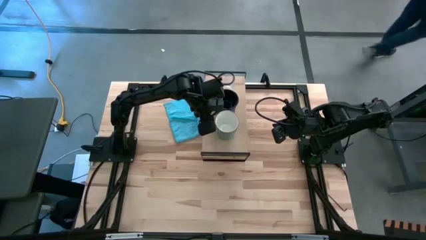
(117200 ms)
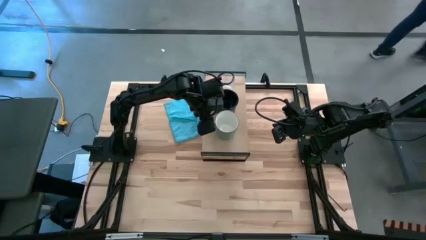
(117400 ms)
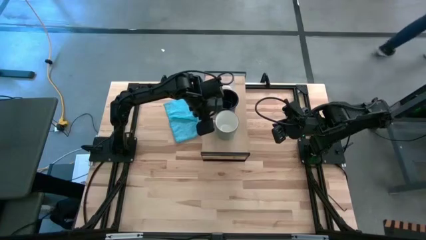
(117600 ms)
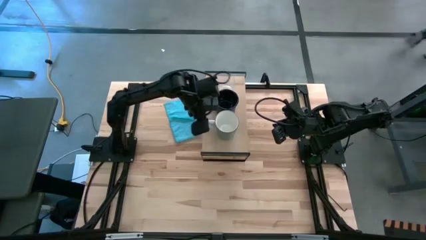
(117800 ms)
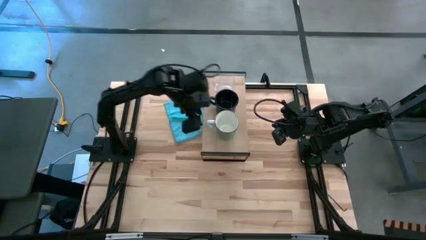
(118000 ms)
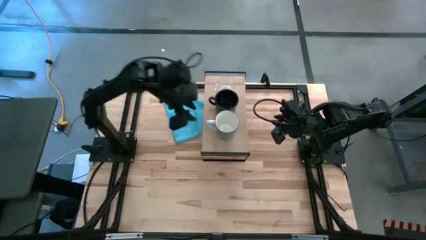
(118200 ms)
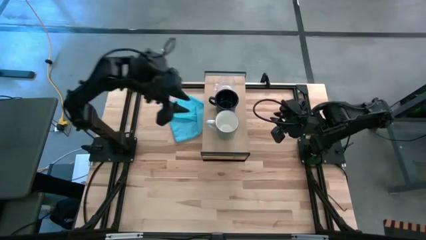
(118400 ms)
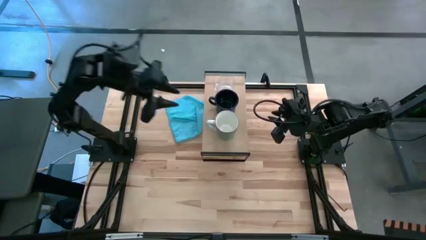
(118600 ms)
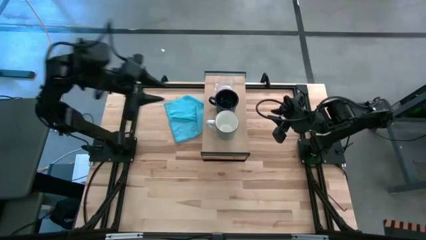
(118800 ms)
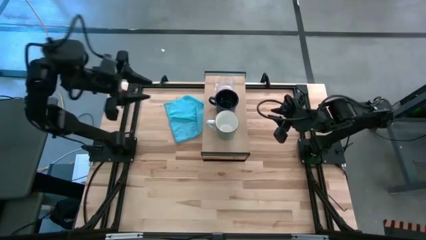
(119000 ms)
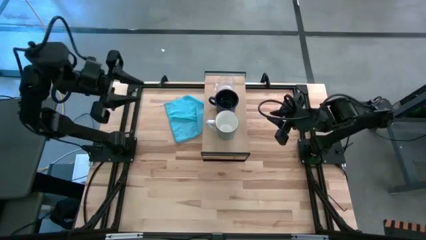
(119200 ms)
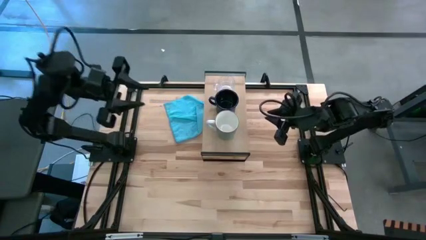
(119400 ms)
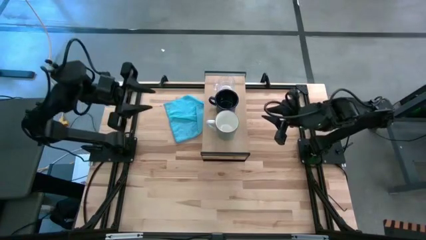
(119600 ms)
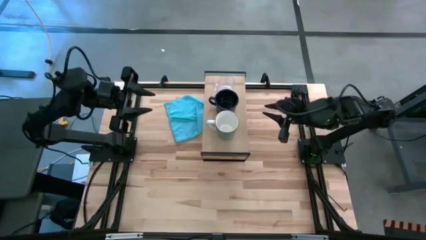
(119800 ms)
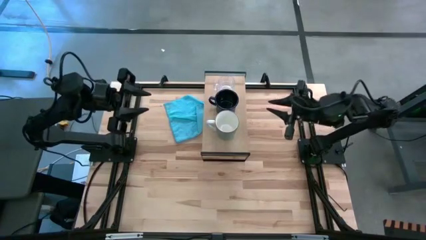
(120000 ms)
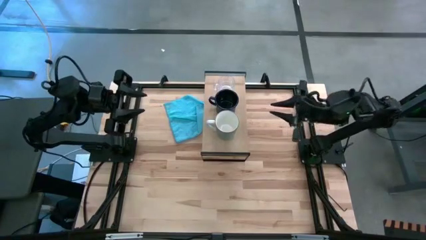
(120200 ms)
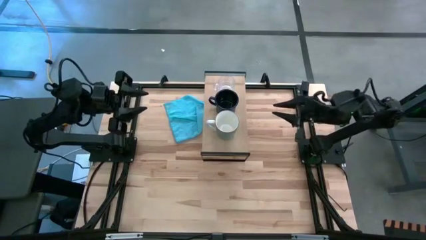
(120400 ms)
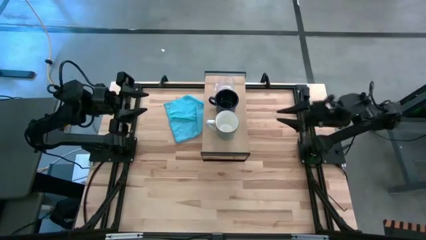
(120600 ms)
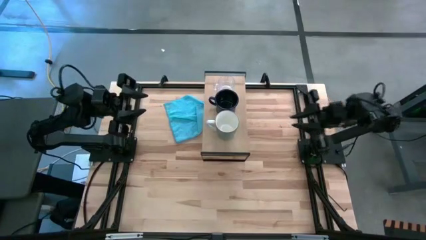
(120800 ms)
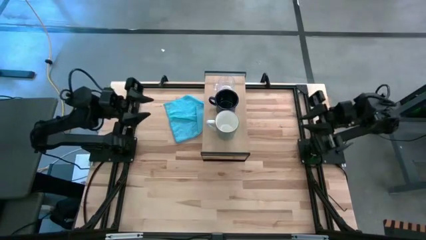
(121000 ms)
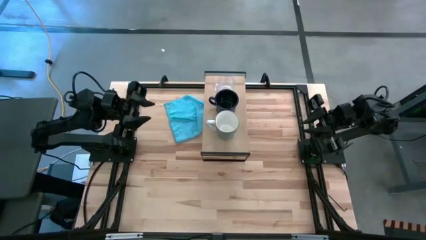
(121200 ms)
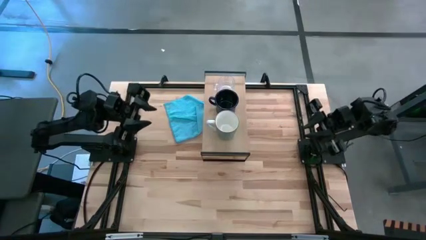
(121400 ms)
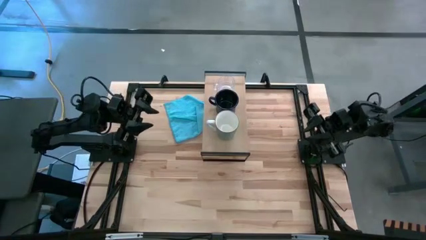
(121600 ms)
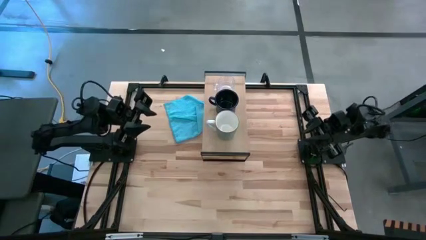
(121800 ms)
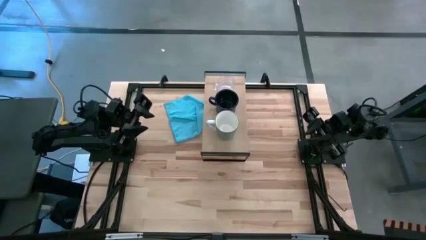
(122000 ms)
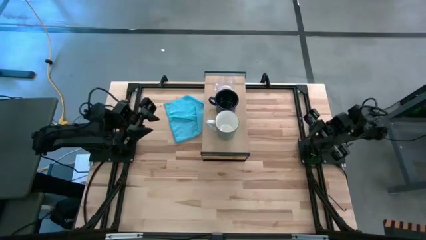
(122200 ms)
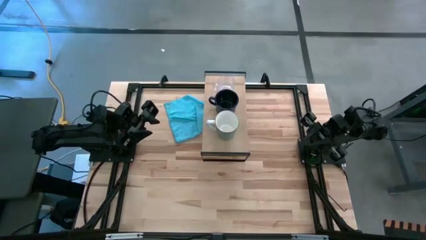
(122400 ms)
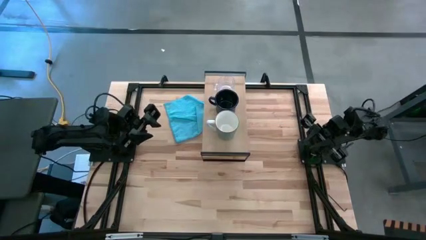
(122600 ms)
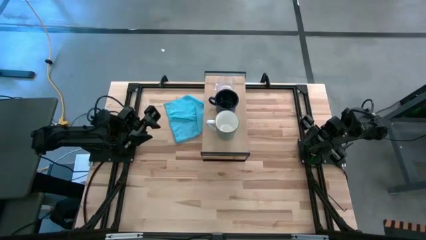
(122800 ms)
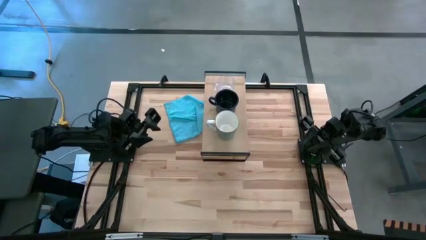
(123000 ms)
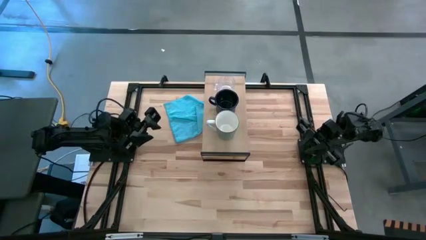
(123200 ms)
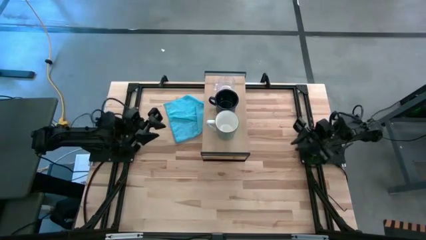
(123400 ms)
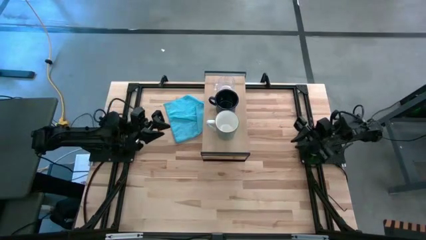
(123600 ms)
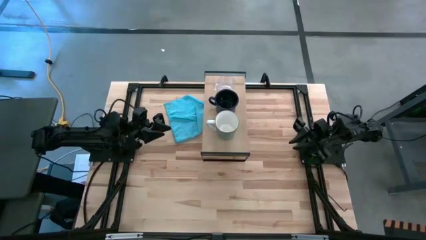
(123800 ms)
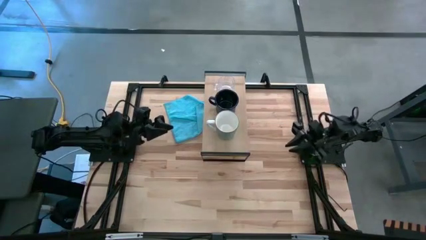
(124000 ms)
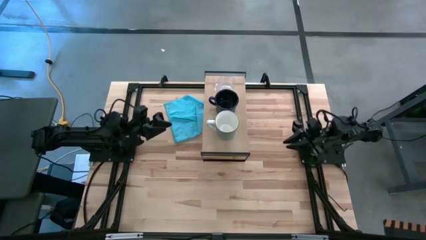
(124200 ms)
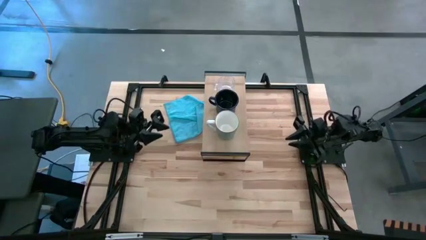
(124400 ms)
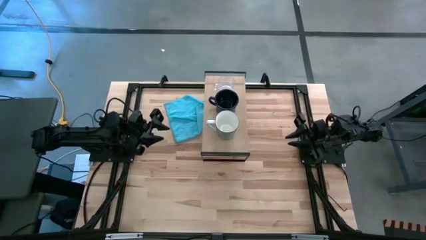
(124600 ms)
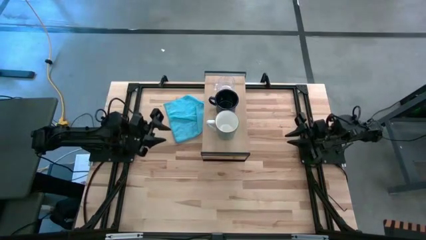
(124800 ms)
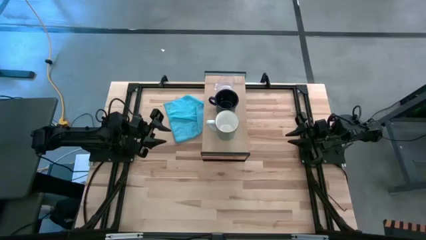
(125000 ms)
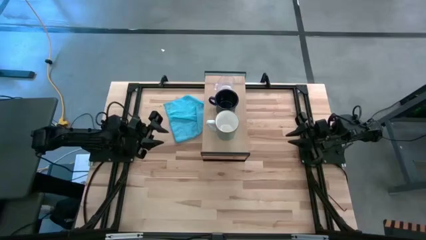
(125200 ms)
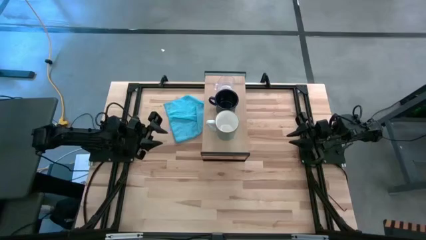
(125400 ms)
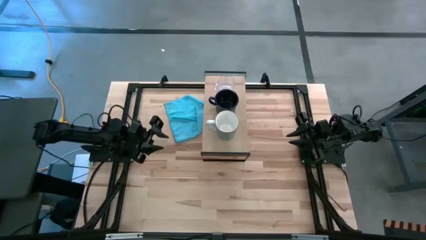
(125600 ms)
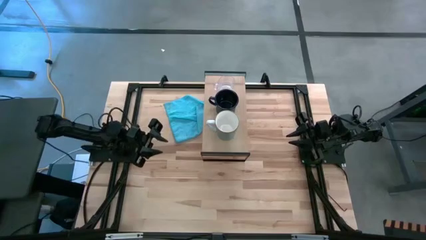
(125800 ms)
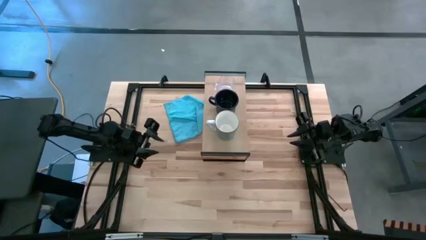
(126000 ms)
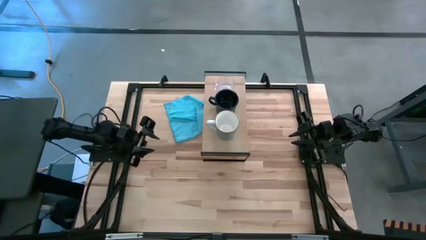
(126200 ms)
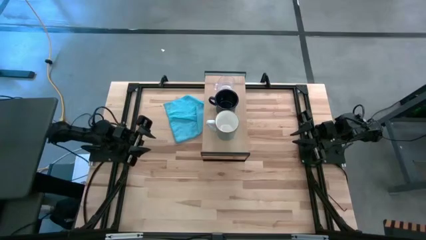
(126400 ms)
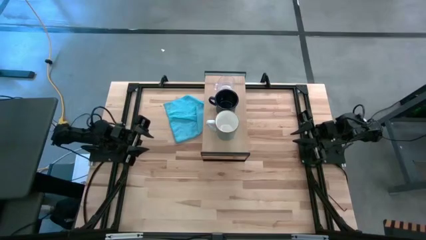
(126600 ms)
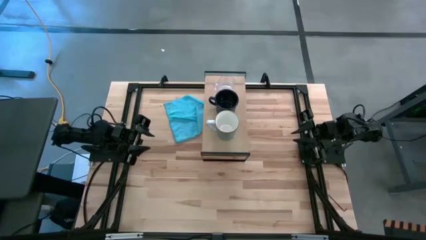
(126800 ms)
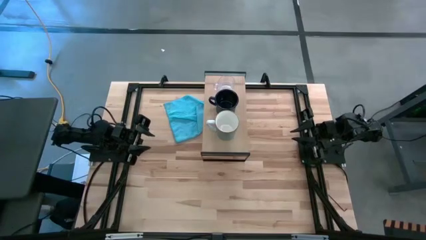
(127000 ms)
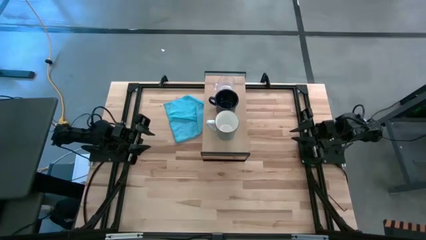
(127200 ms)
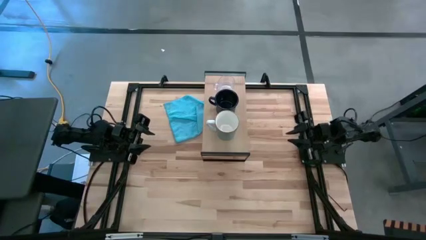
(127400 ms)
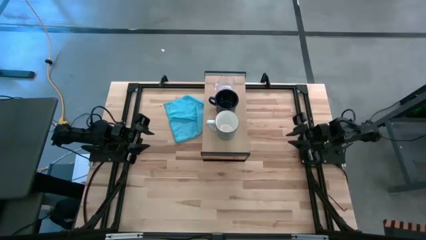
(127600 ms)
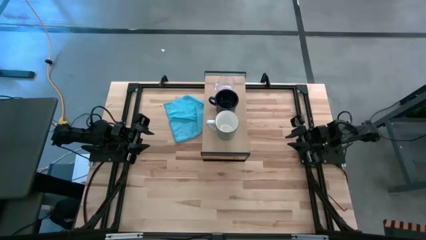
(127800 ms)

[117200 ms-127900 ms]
Task: Stack small to large cups/mugs on shelf
Return to Home Position
